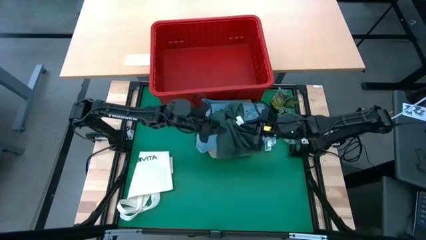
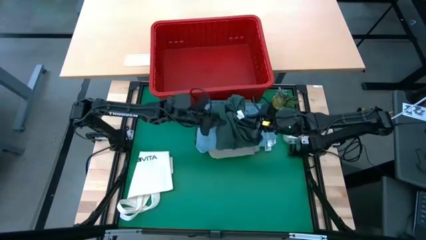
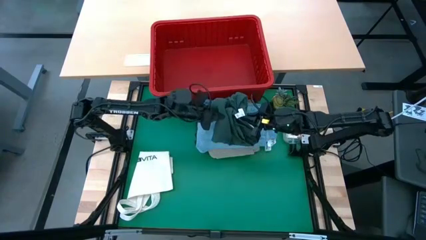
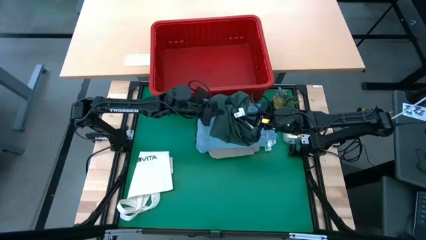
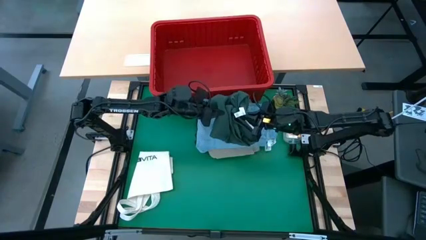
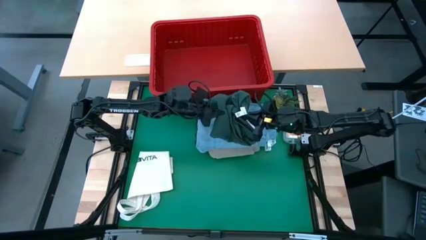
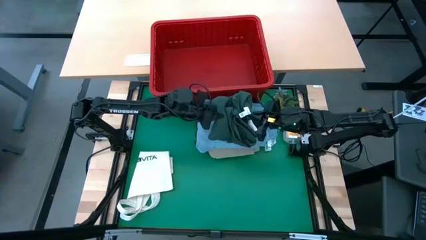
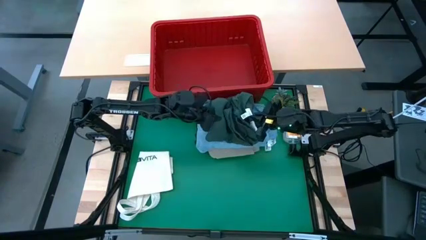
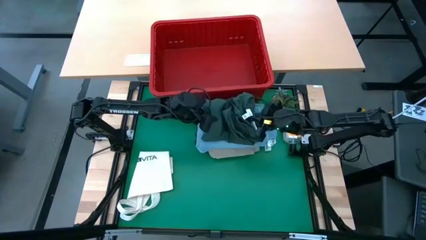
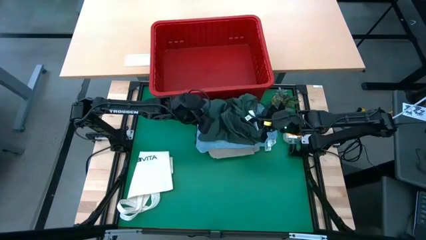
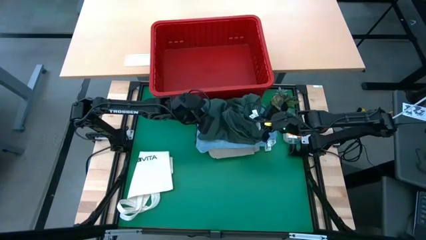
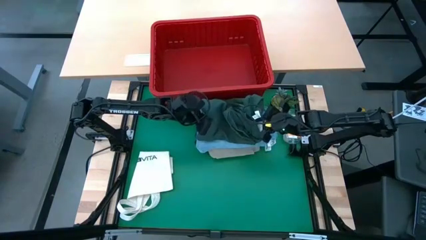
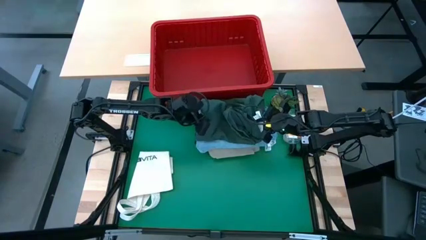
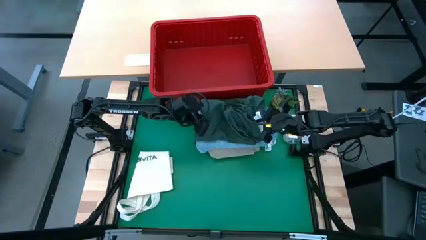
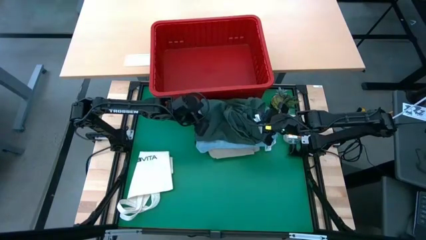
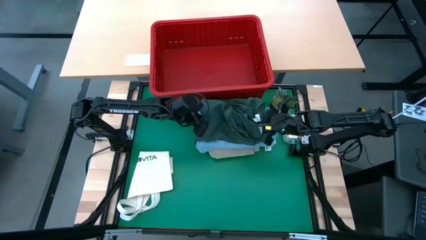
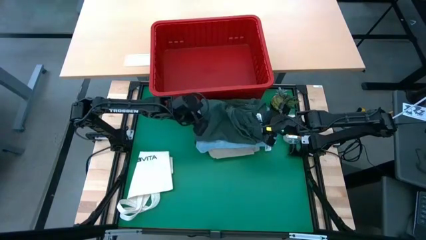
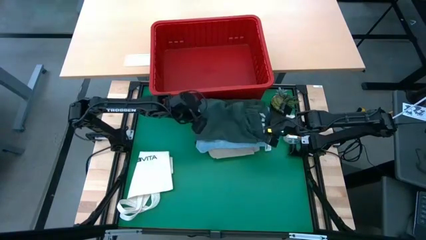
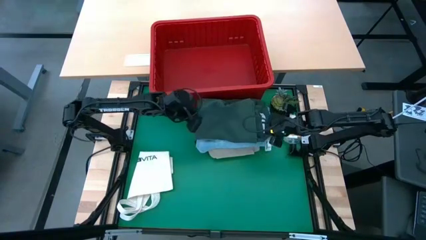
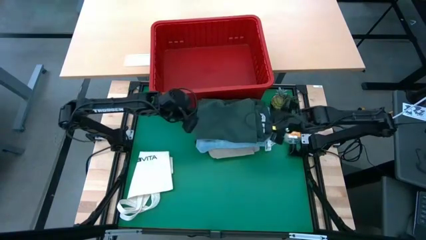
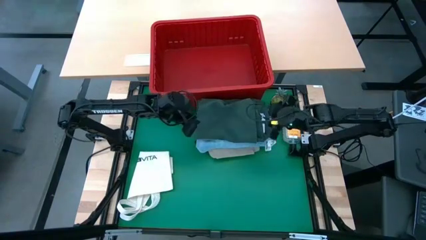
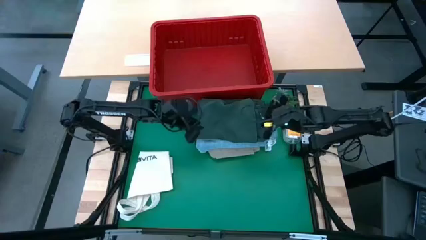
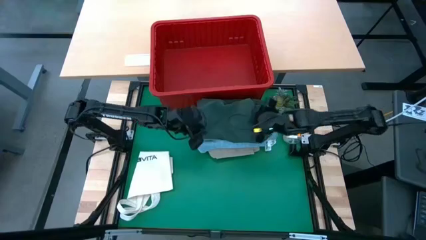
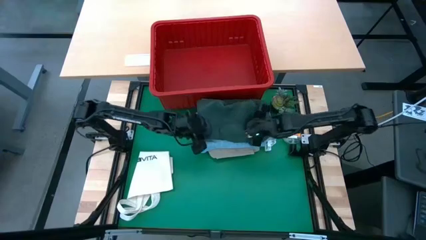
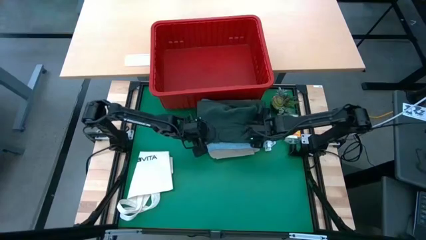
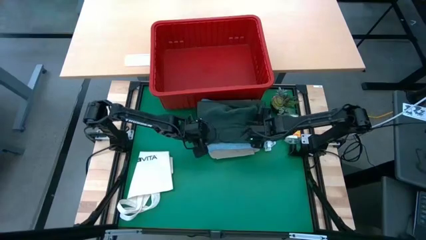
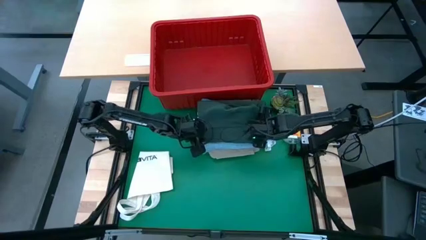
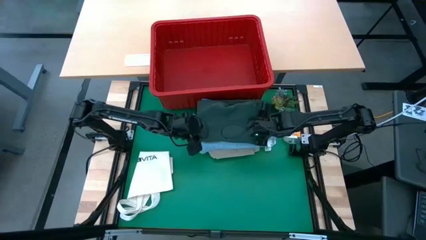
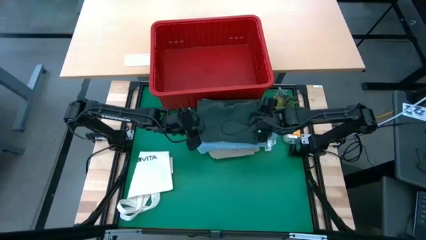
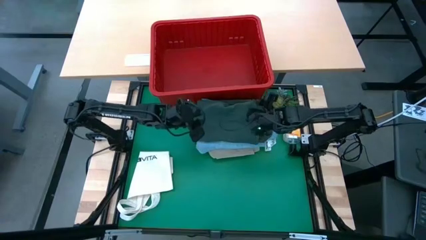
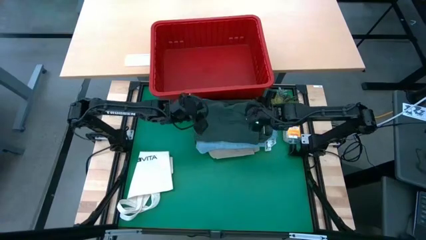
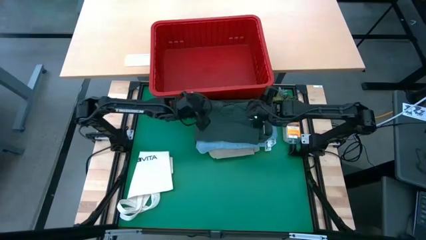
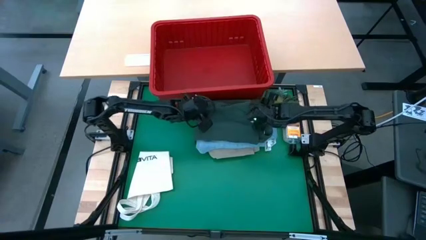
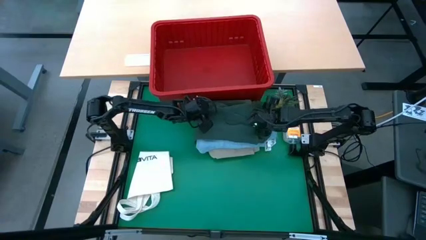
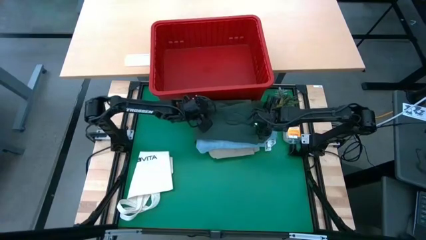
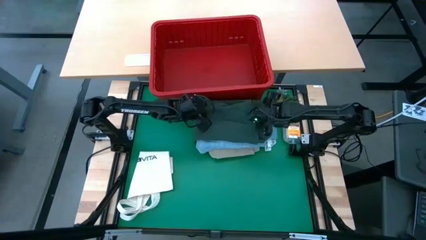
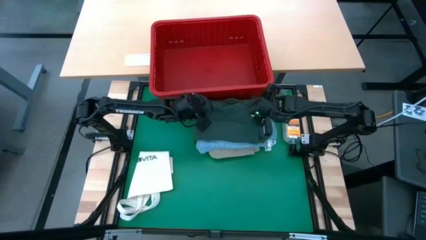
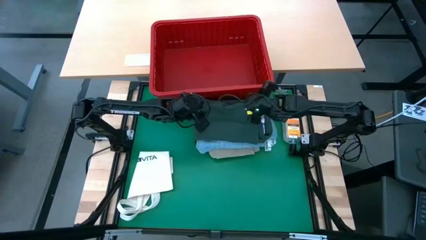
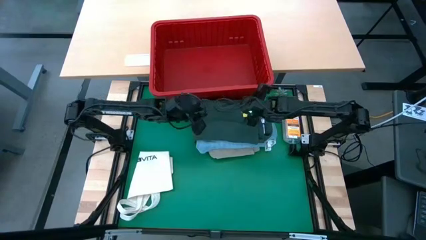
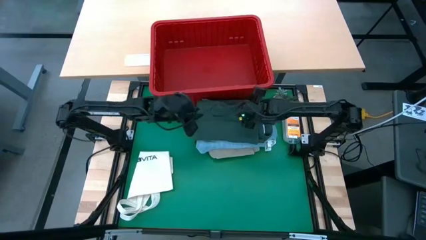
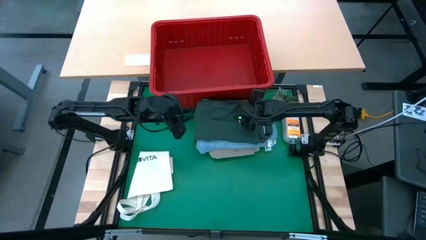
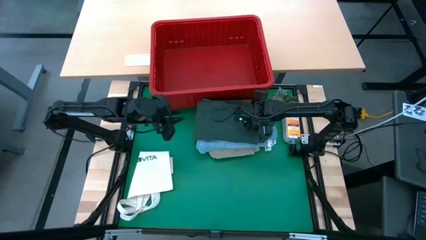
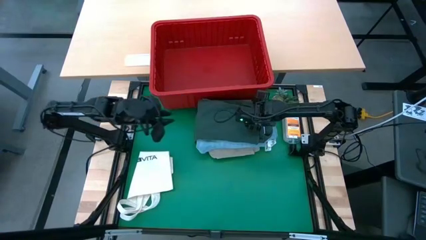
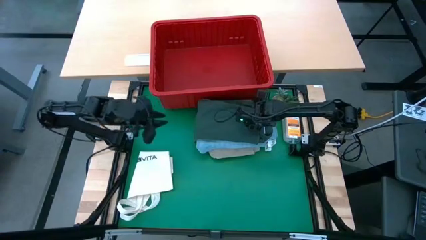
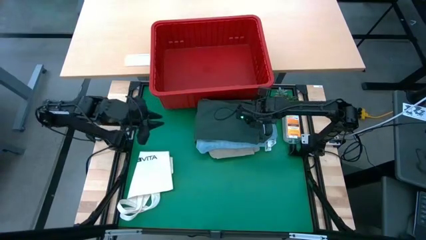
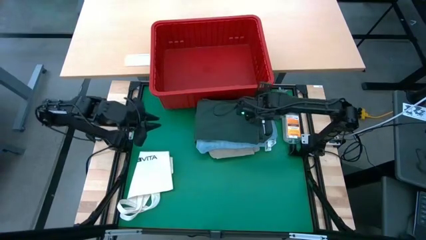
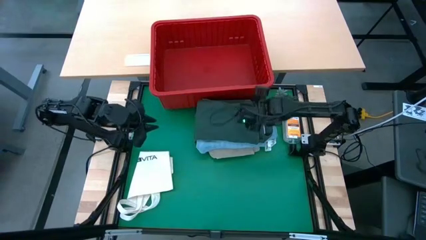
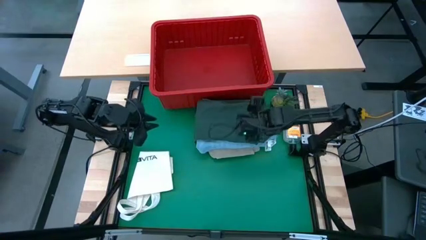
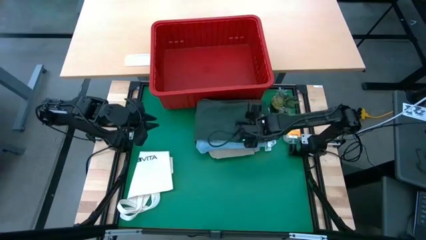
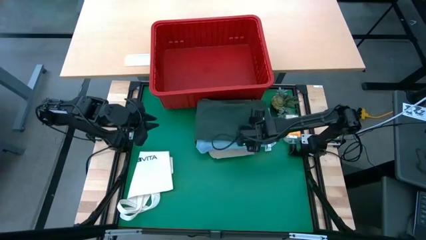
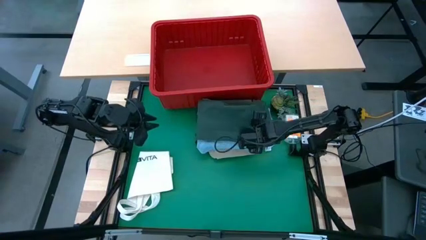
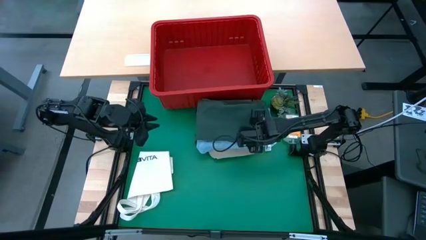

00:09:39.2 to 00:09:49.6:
Task: Fold laundry
Stack the green polo shirt on the blue pants

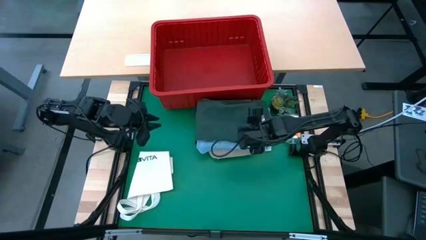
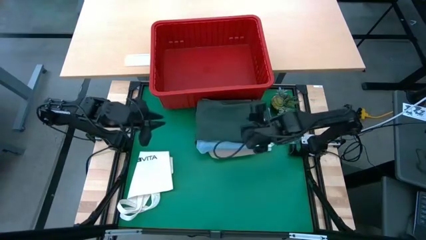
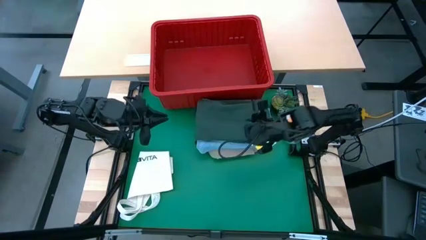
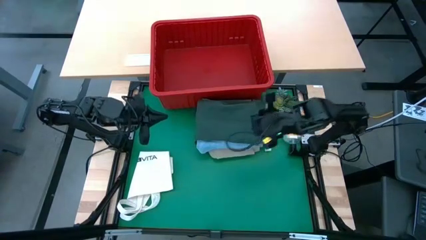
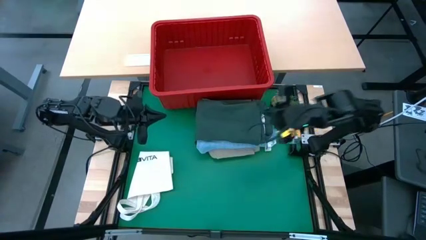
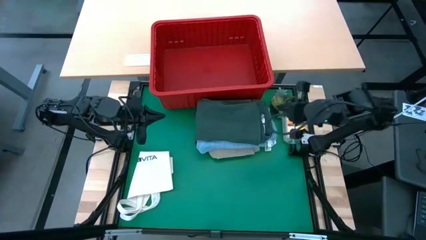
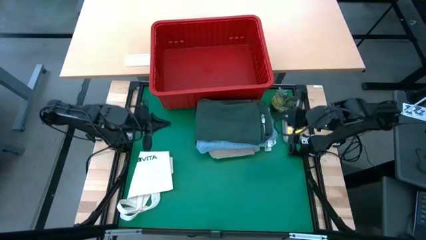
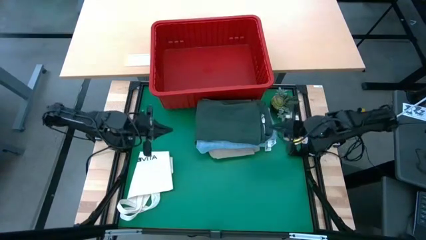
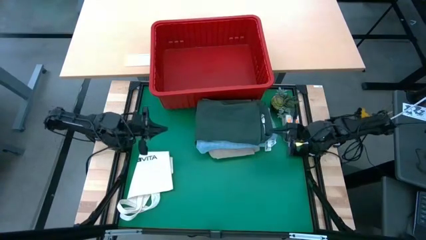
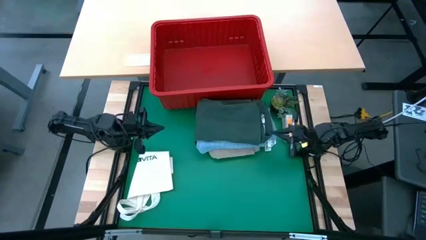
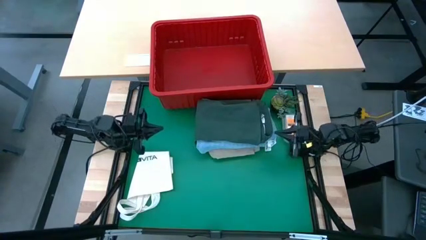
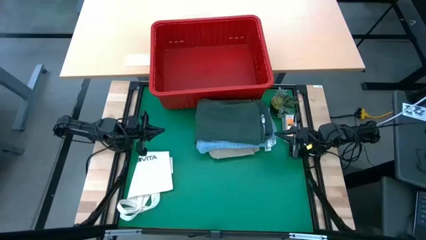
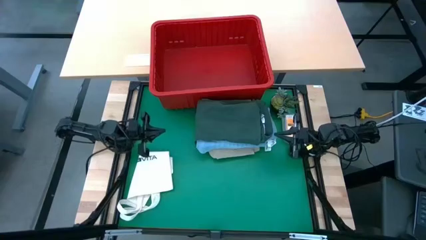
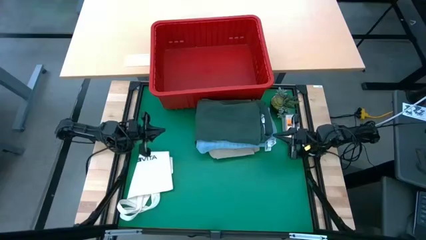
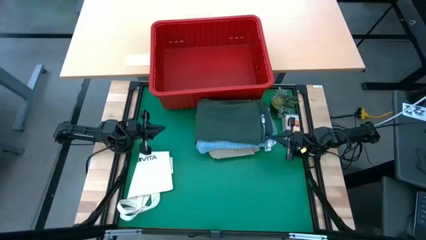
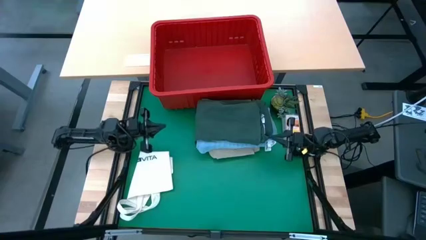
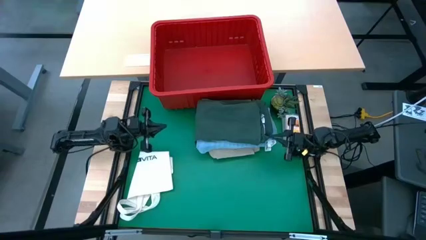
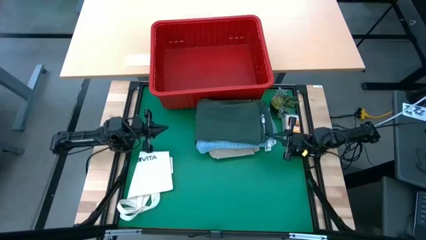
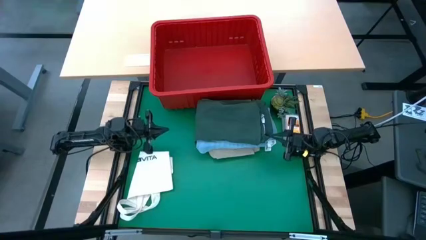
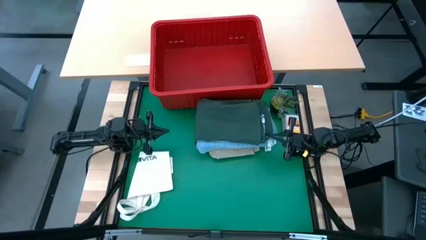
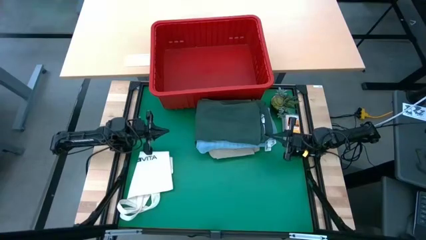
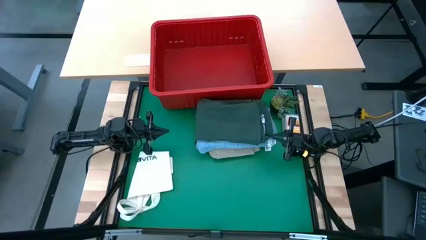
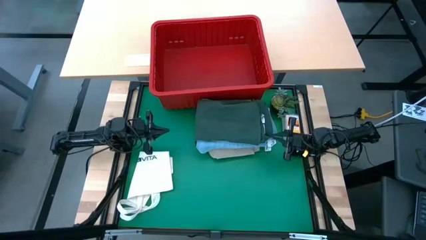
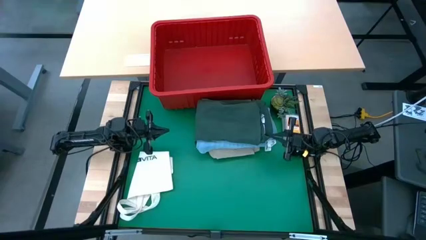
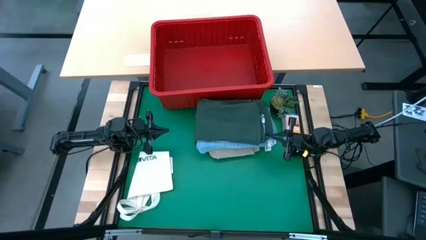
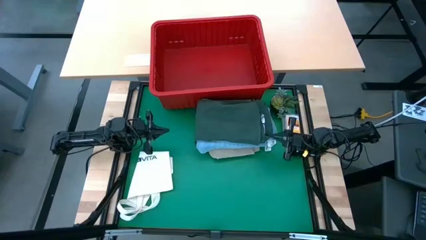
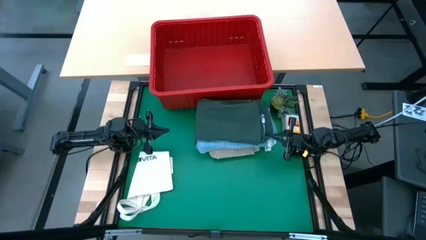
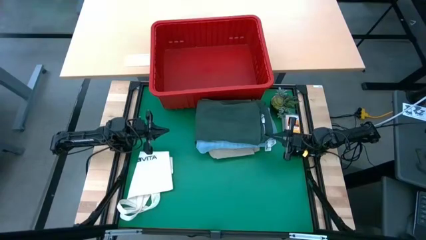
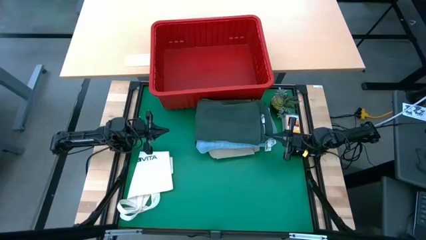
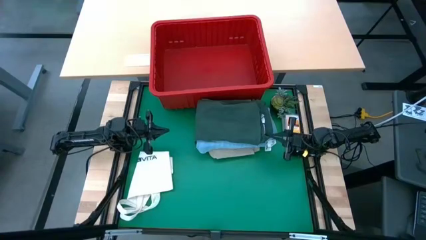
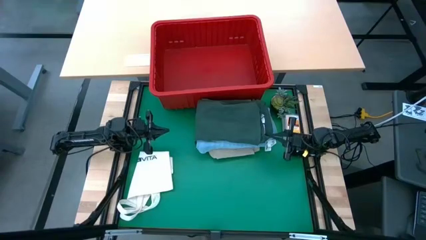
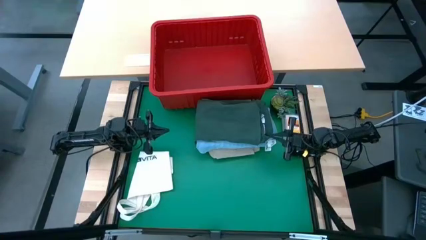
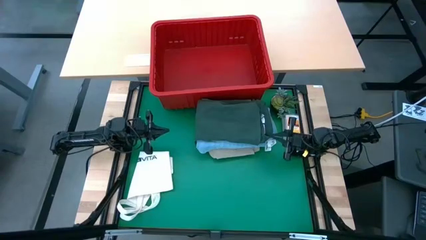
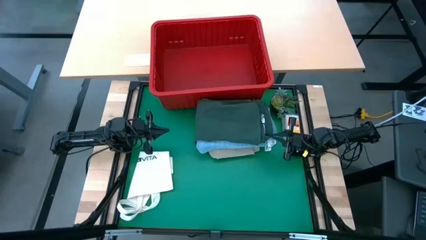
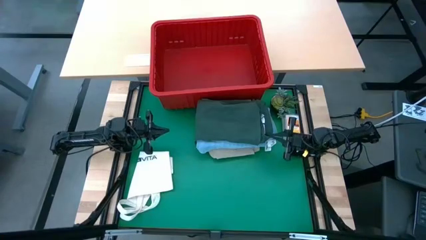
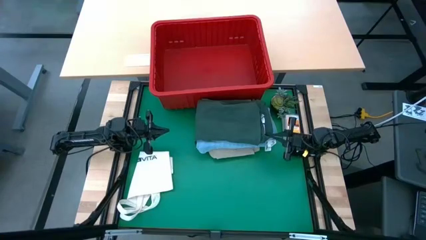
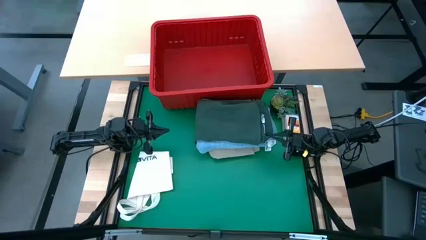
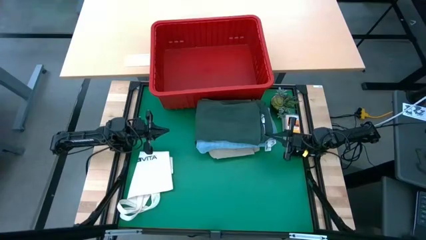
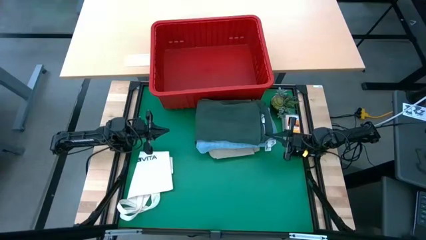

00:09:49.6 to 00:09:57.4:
Return to Home Position
